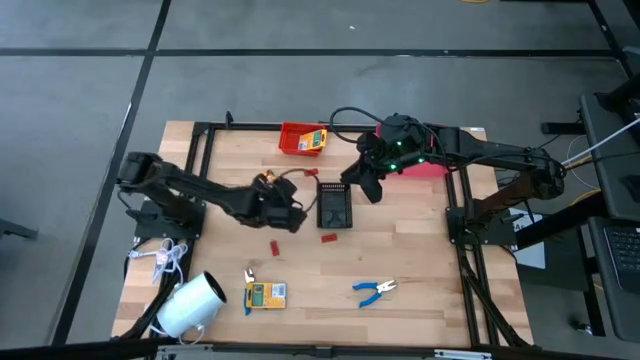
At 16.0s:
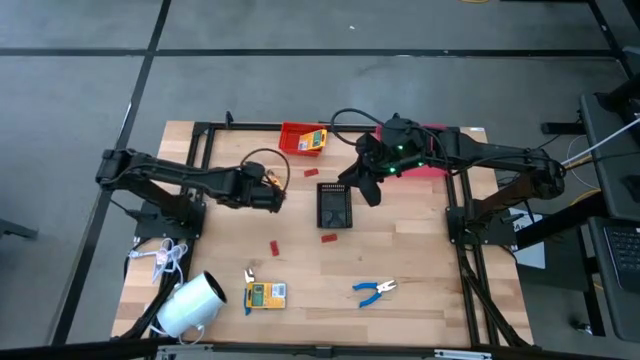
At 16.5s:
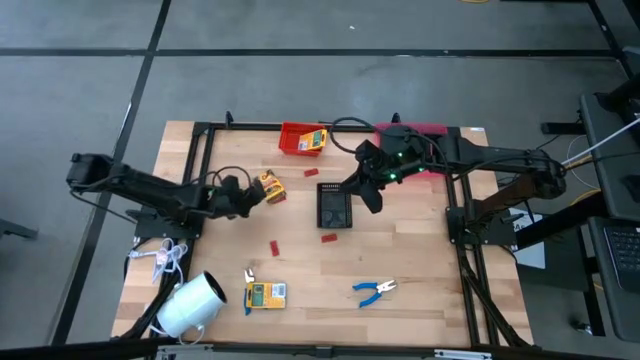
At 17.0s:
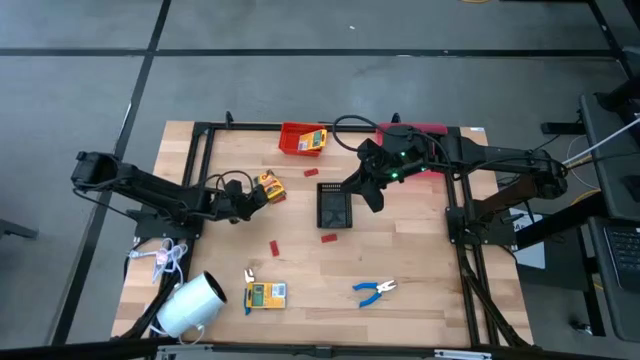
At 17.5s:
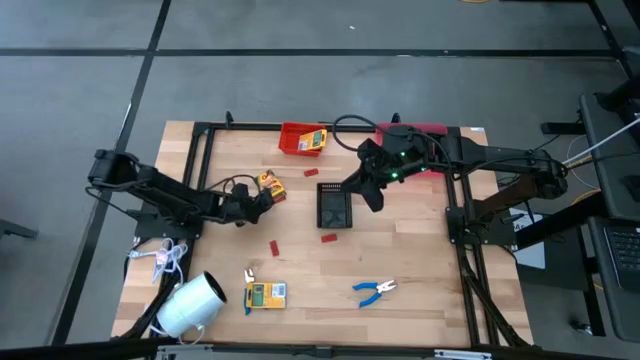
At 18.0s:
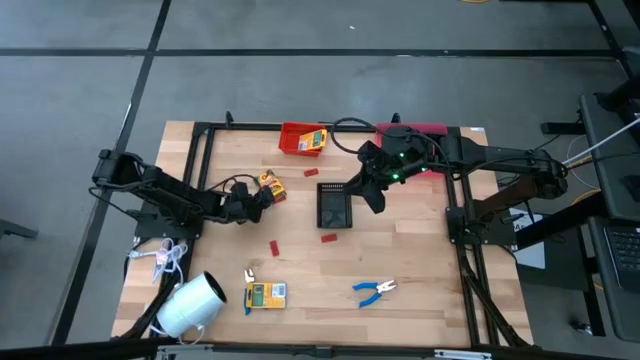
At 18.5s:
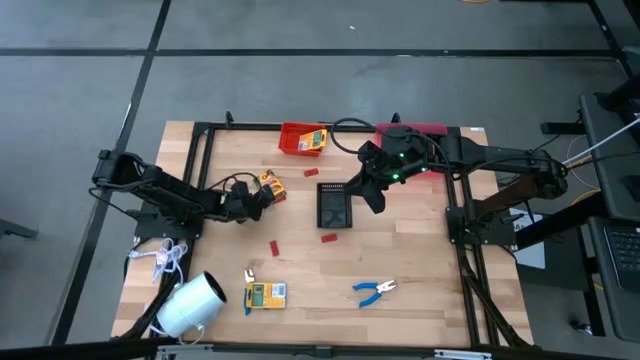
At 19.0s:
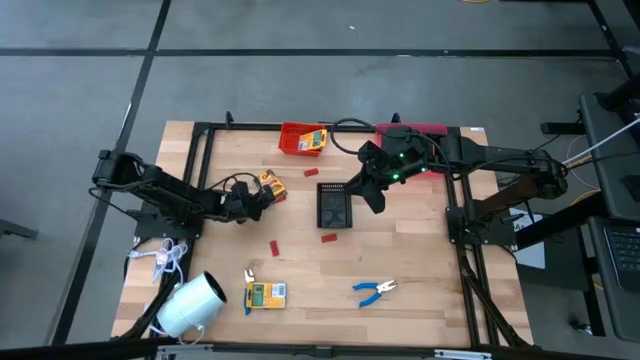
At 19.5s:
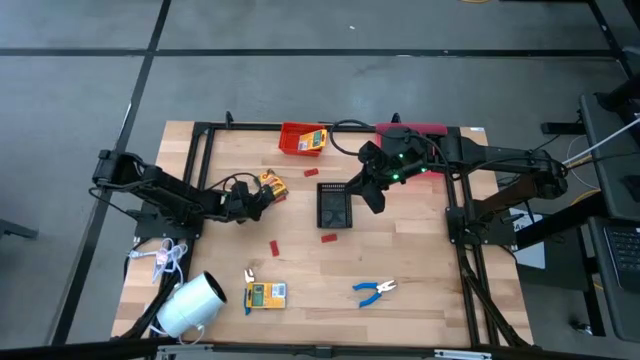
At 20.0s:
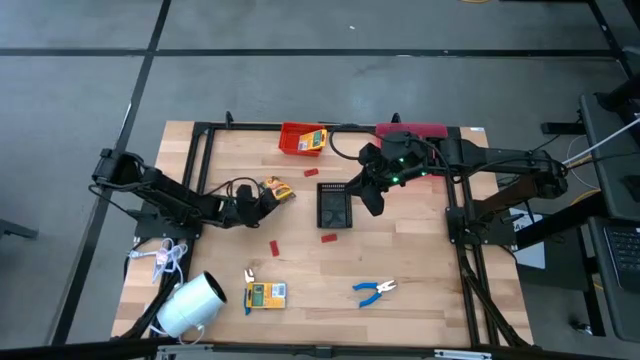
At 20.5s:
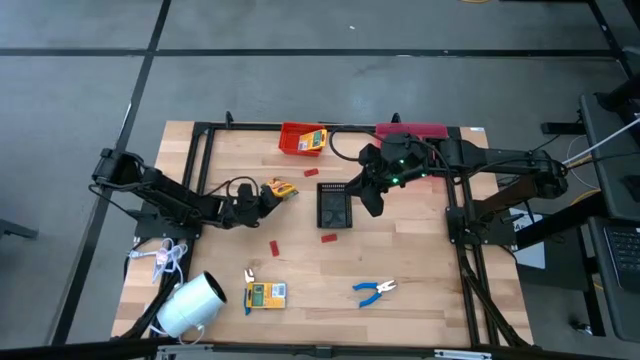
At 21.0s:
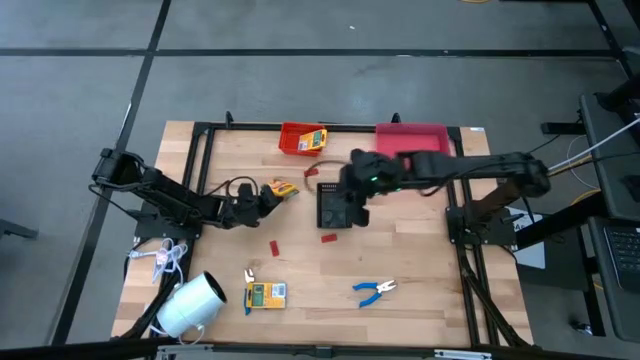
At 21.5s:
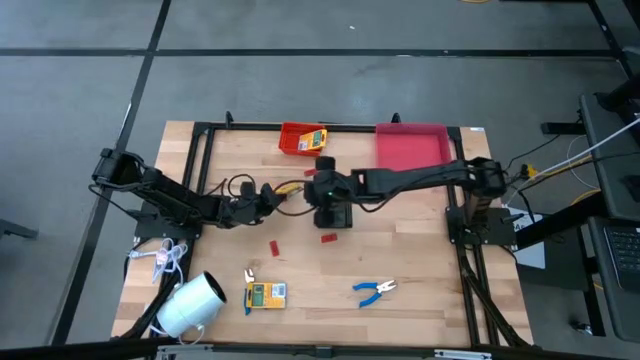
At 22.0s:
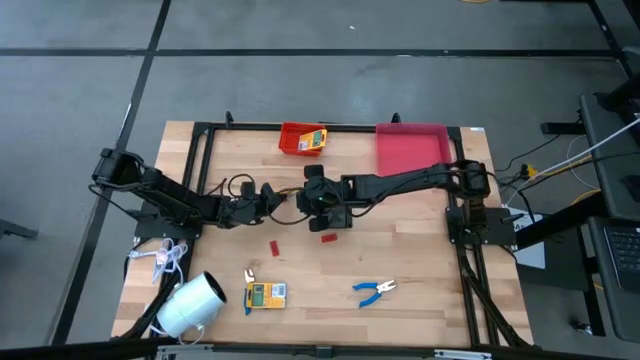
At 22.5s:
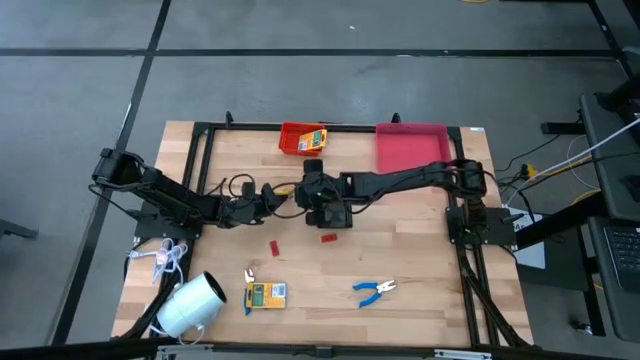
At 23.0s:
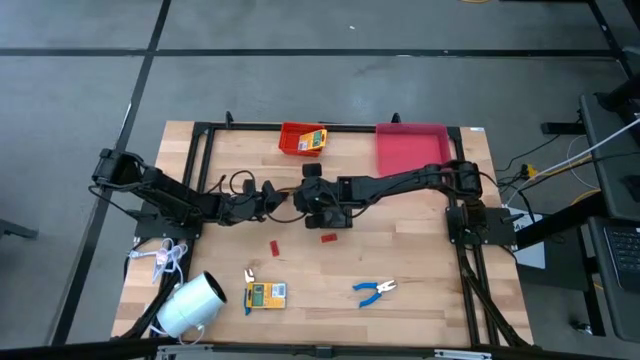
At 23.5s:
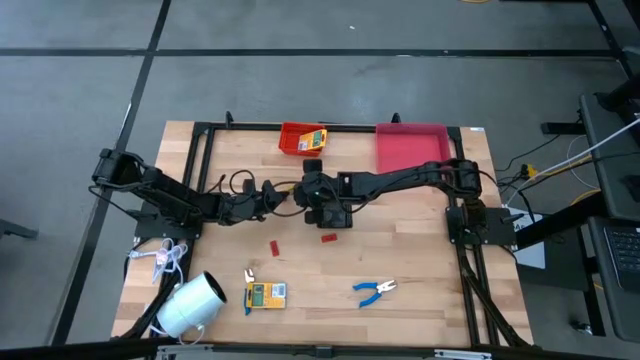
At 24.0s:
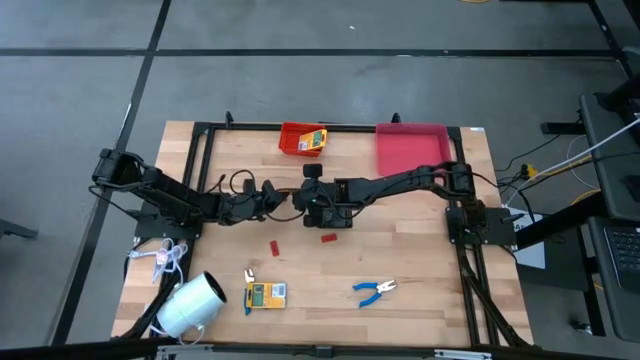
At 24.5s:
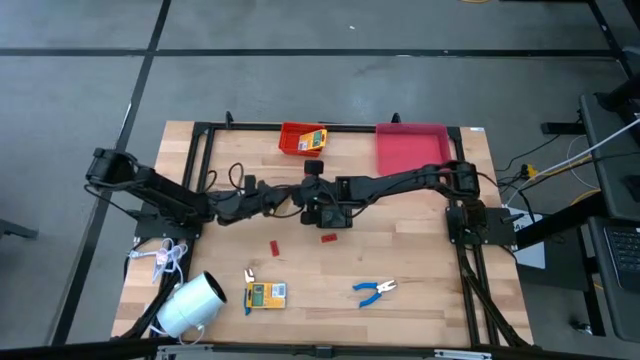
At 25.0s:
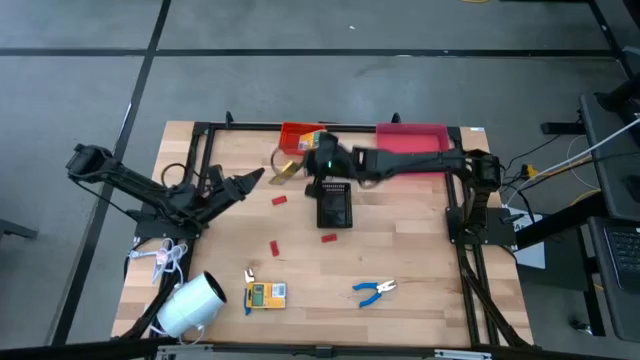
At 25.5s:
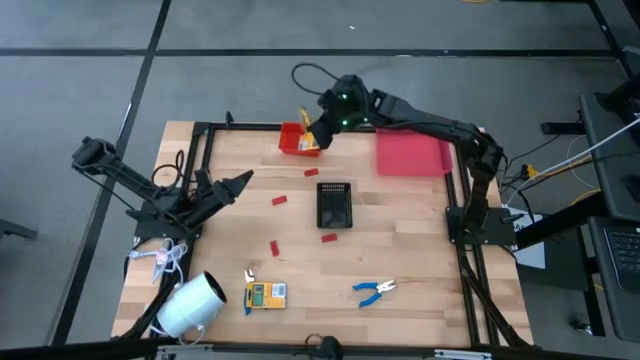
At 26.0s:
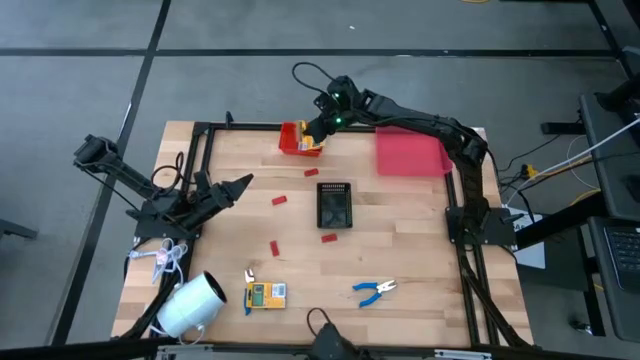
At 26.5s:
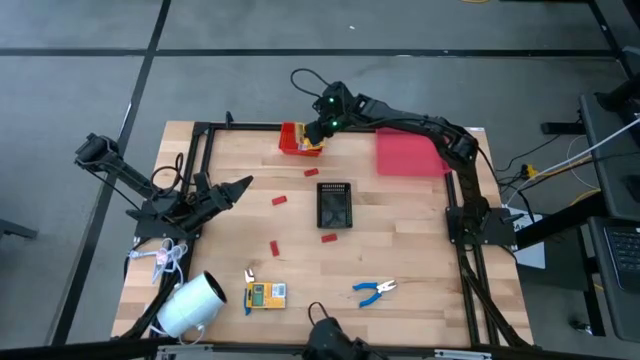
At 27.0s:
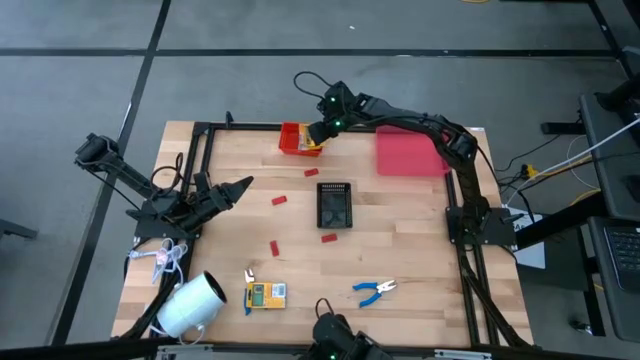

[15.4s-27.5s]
Task: Pick & Place School Supplies
Put the yellow crayon box into the red bin

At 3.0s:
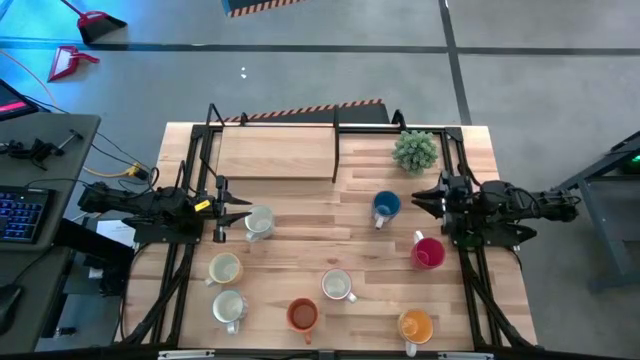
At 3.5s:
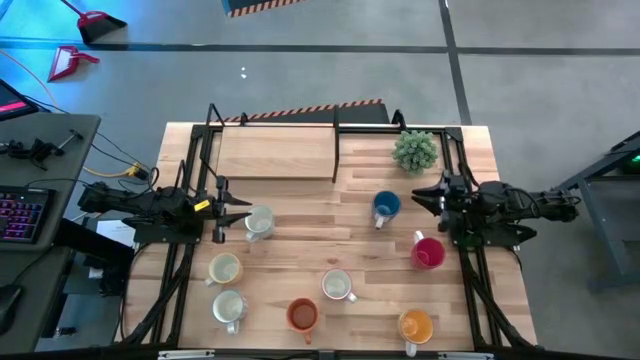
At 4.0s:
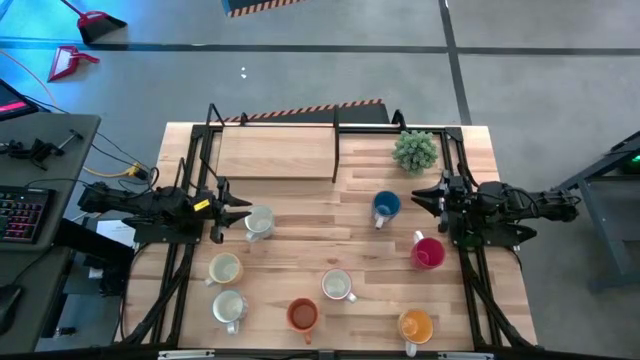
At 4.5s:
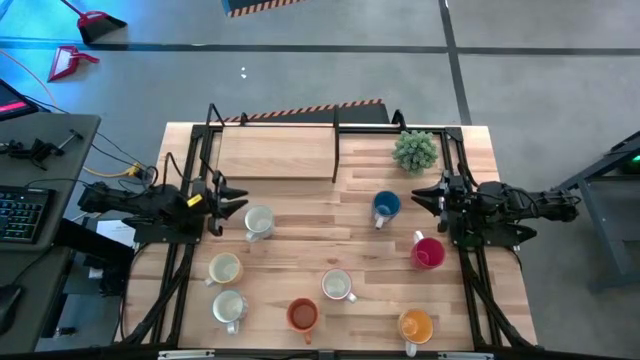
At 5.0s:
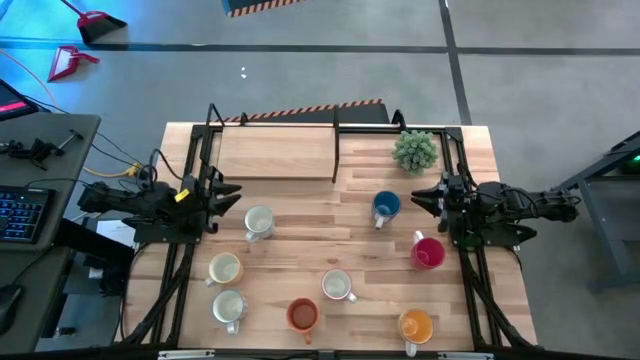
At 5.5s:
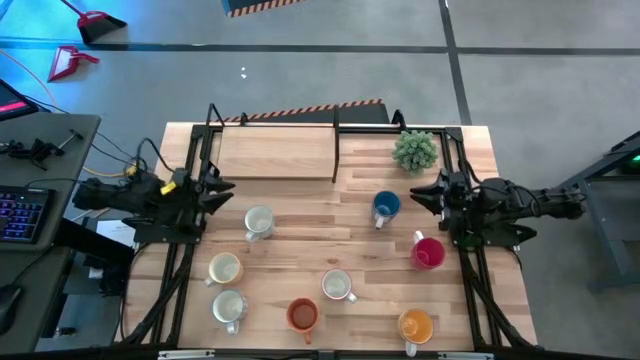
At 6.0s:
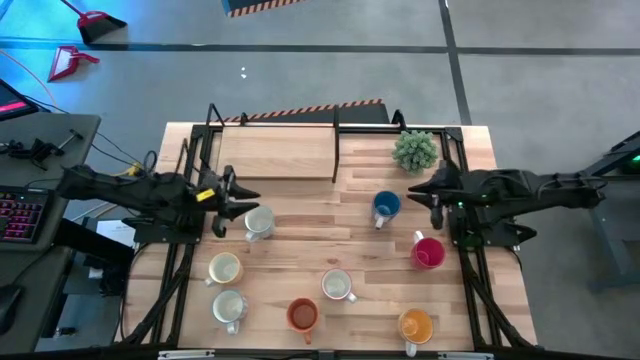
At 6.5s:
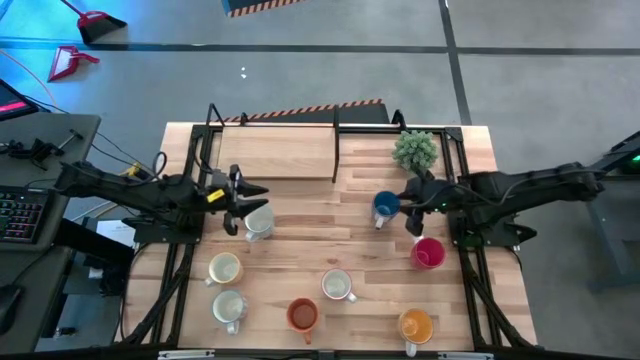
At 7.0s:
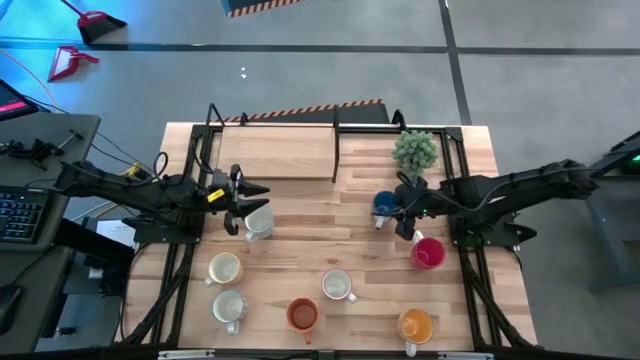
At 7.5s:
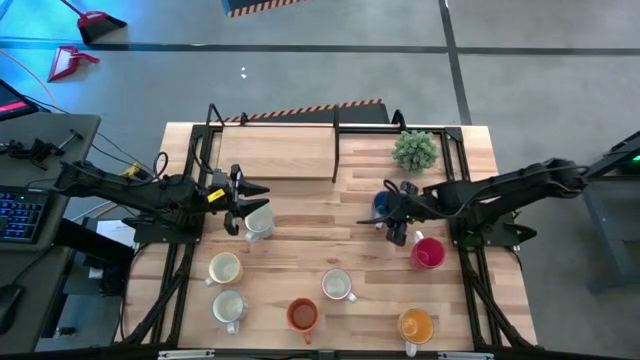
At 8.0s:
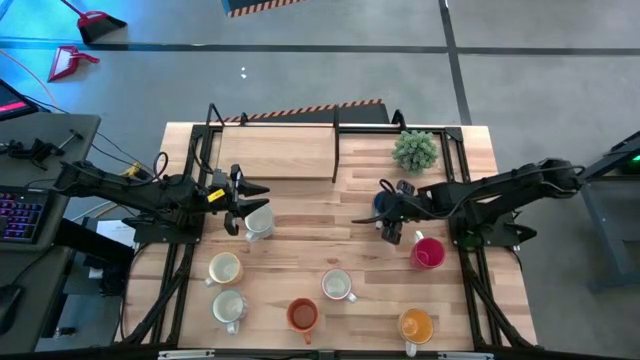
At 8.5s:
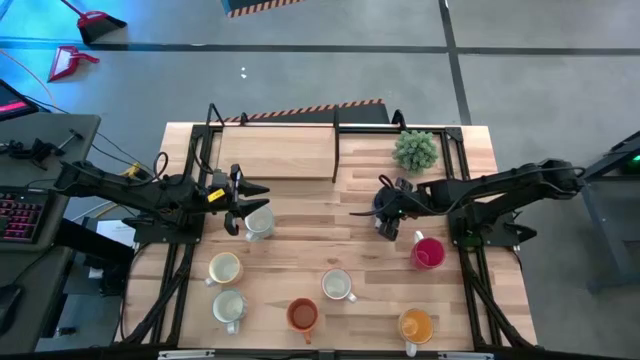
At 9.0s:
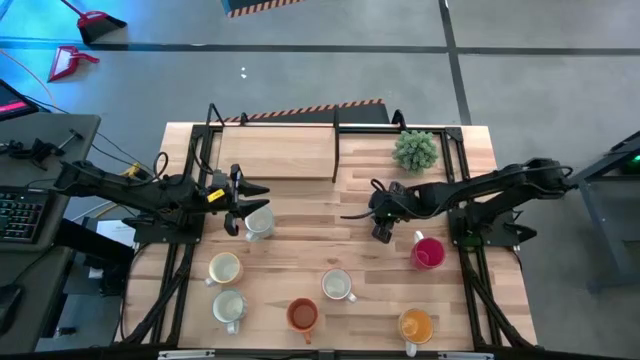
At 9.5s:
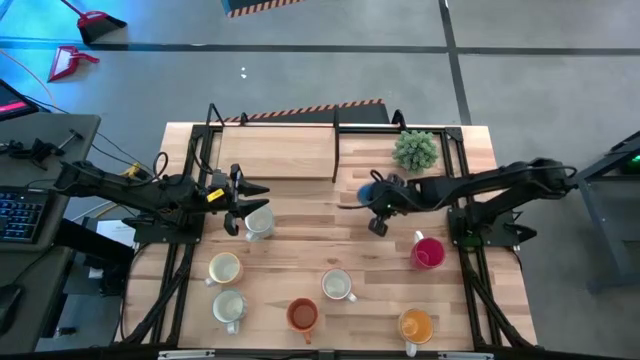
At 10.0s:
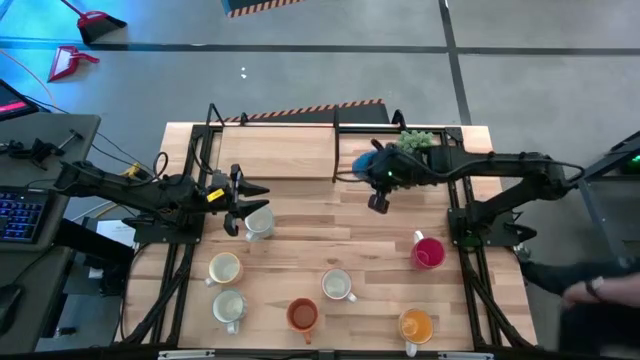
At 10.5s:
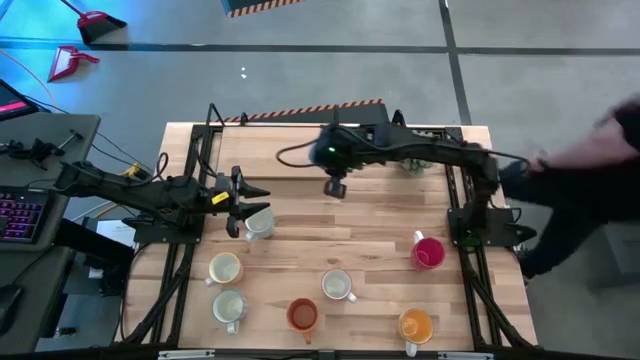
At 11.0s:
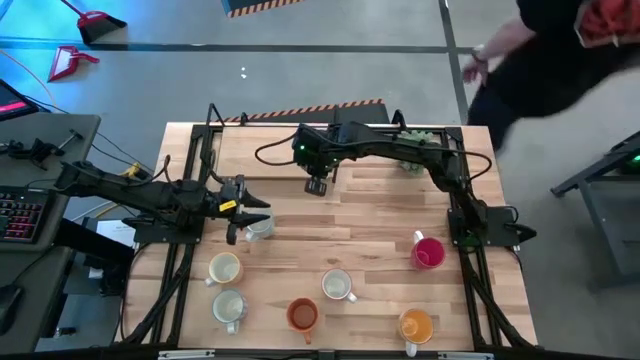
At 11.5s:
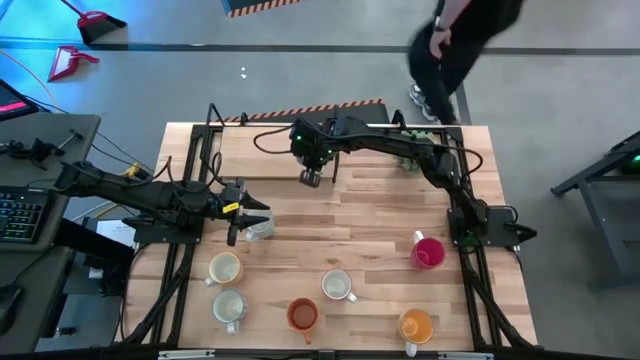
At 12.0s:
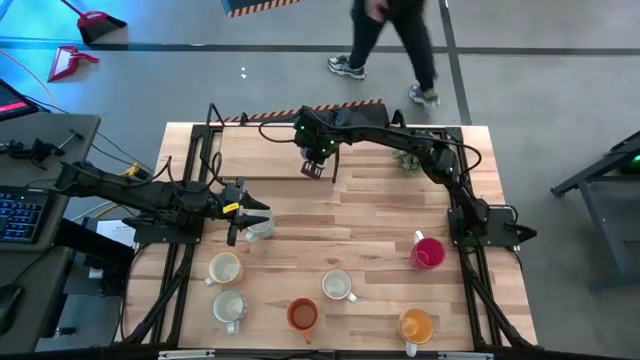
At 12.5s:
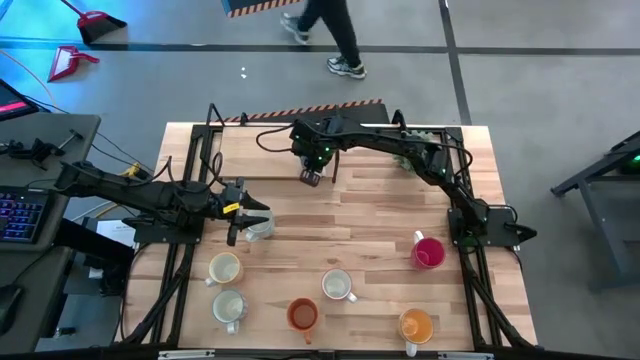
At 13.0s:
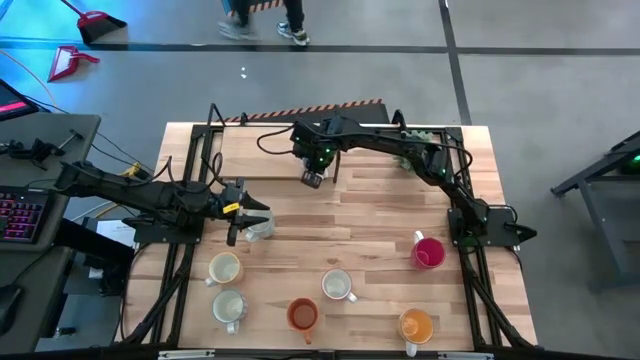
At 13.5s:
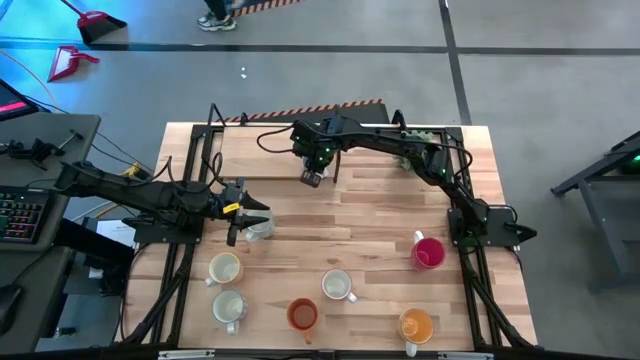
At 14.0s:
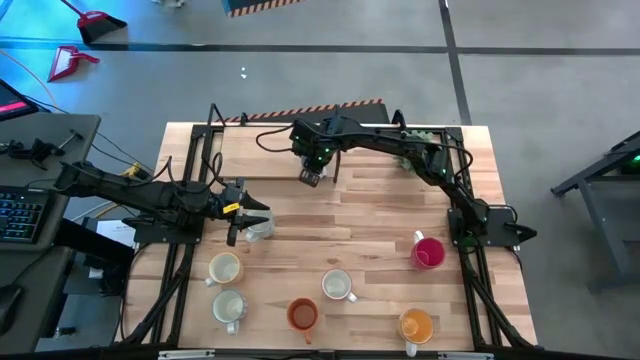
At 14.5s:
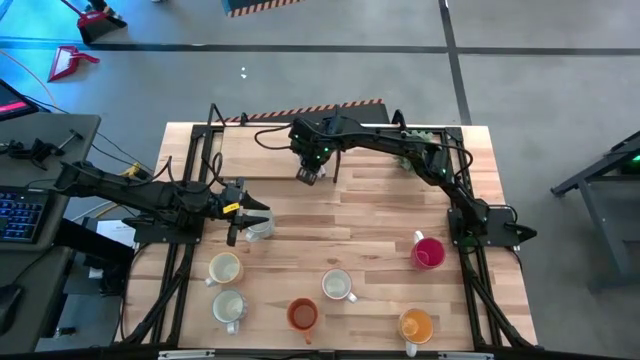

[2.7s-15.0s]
Task: Place coffee mugs
Put the blue mug on the shelf
